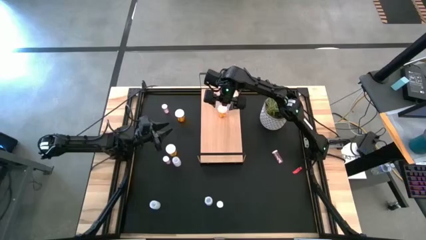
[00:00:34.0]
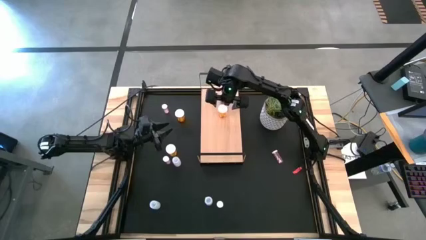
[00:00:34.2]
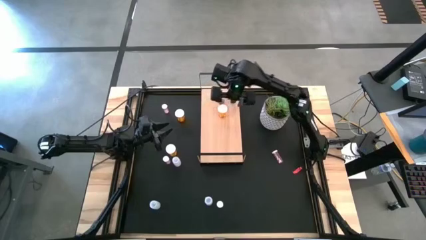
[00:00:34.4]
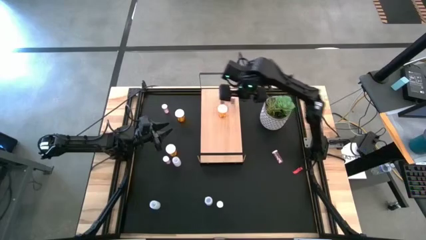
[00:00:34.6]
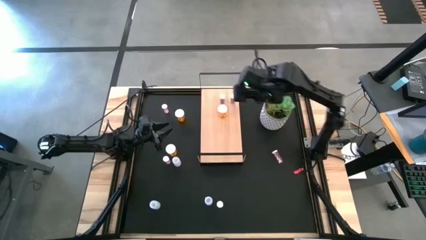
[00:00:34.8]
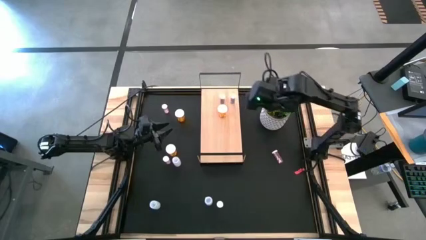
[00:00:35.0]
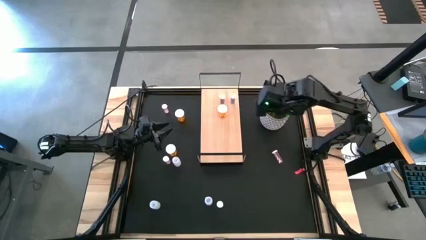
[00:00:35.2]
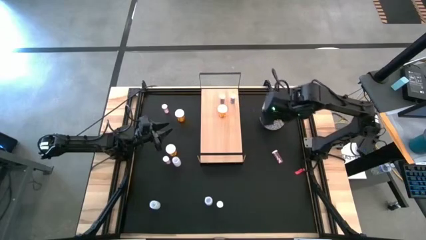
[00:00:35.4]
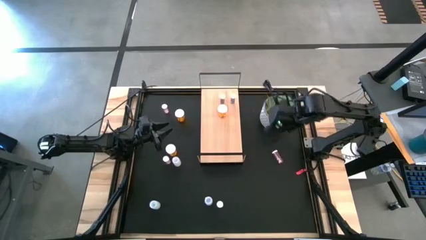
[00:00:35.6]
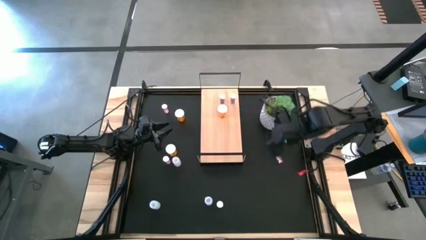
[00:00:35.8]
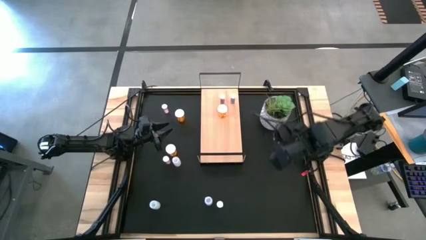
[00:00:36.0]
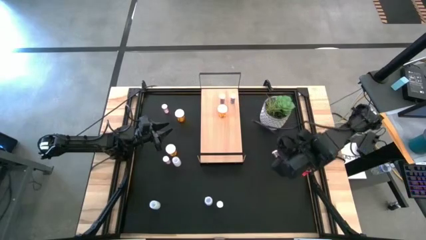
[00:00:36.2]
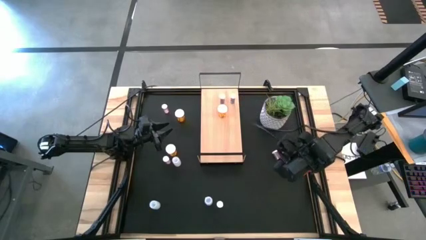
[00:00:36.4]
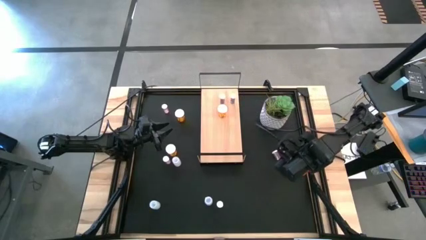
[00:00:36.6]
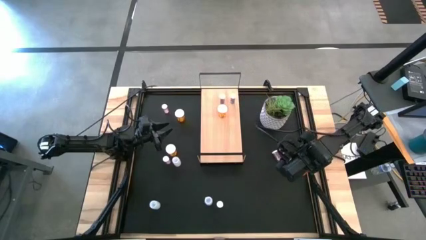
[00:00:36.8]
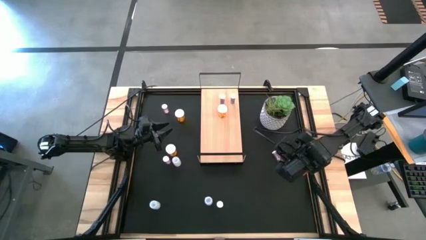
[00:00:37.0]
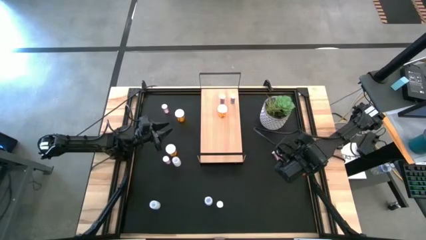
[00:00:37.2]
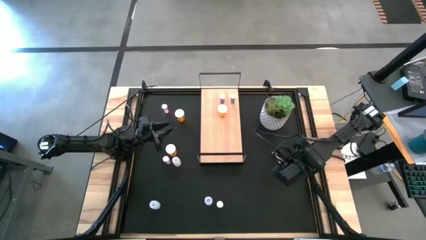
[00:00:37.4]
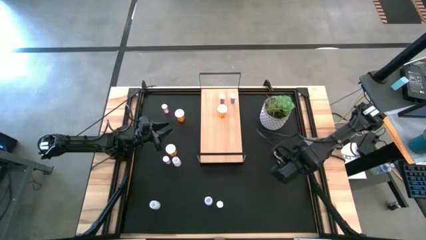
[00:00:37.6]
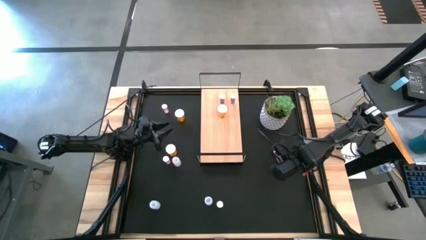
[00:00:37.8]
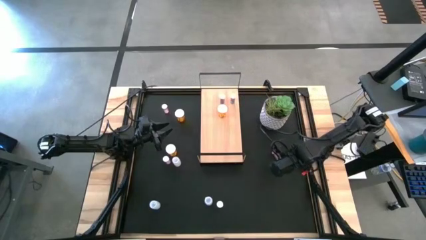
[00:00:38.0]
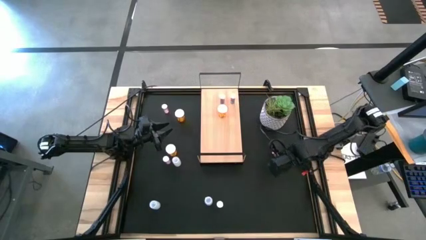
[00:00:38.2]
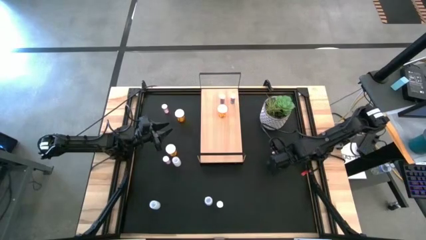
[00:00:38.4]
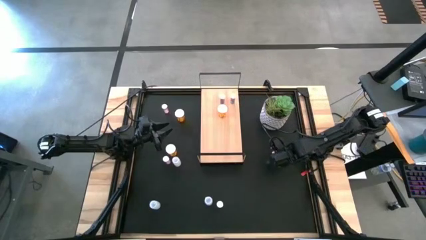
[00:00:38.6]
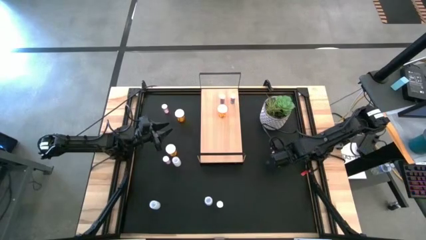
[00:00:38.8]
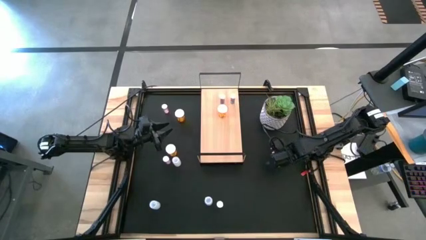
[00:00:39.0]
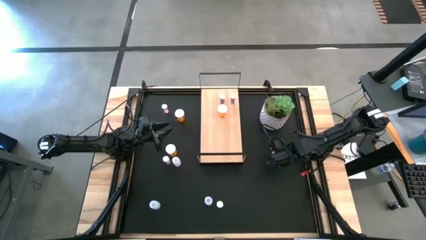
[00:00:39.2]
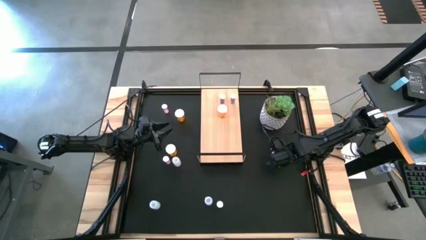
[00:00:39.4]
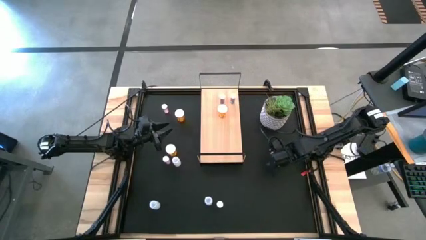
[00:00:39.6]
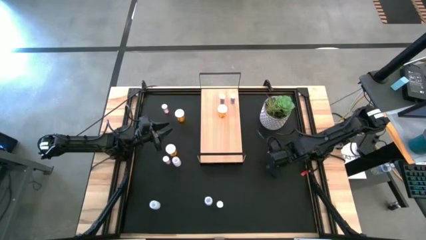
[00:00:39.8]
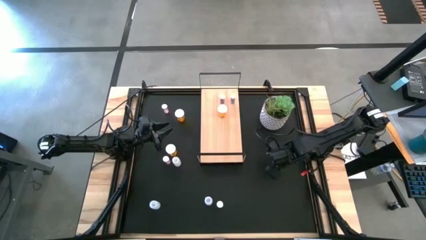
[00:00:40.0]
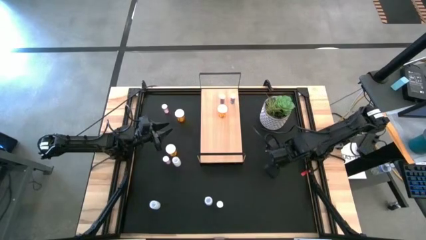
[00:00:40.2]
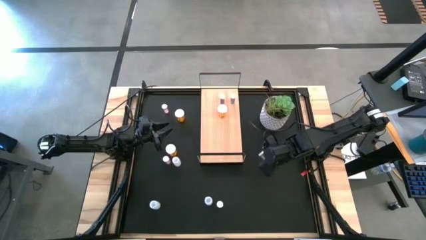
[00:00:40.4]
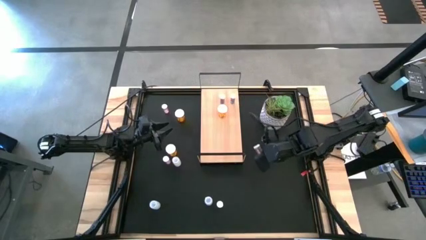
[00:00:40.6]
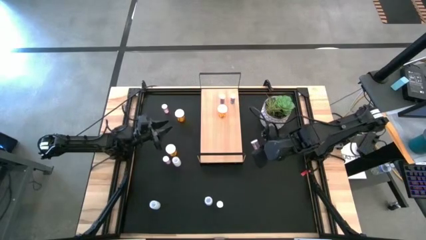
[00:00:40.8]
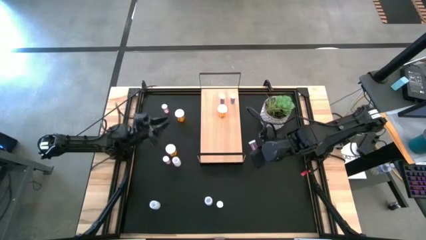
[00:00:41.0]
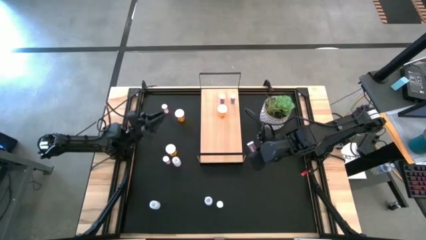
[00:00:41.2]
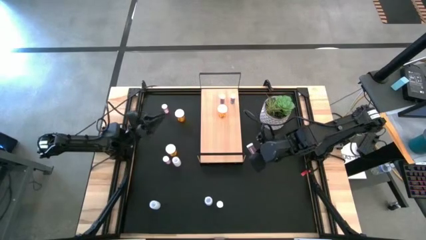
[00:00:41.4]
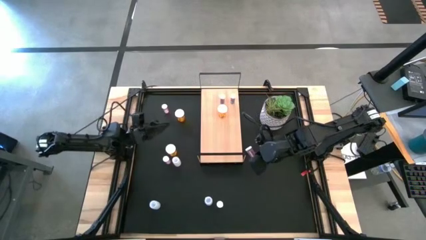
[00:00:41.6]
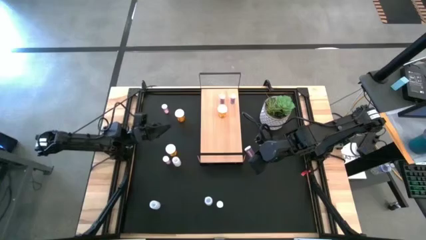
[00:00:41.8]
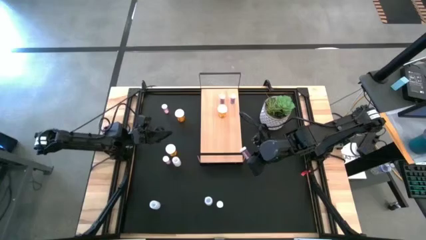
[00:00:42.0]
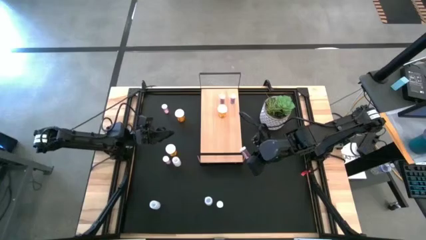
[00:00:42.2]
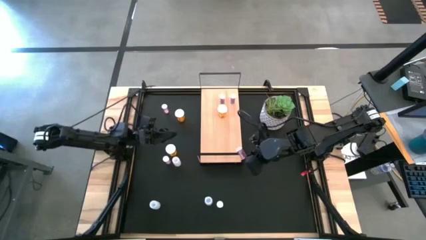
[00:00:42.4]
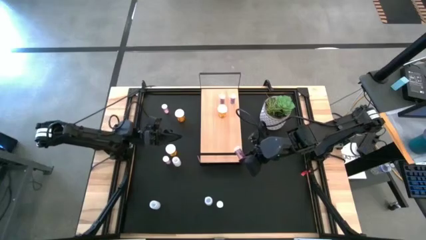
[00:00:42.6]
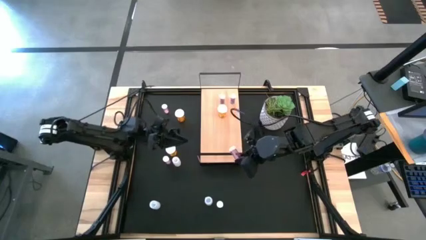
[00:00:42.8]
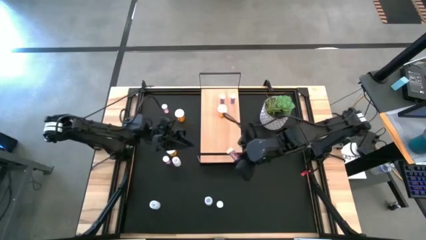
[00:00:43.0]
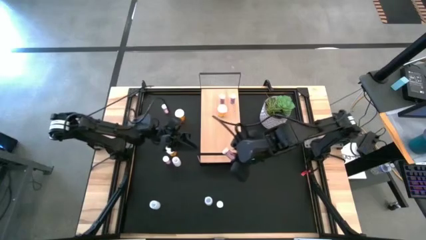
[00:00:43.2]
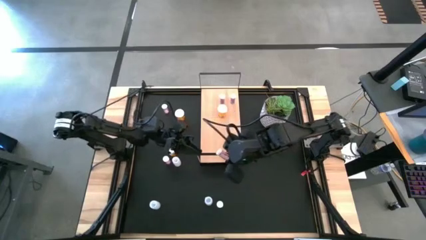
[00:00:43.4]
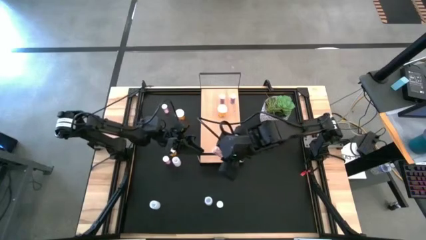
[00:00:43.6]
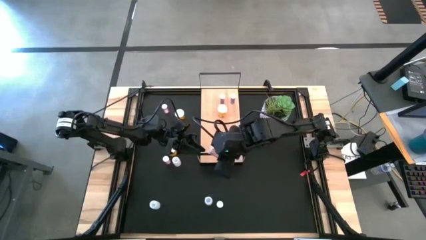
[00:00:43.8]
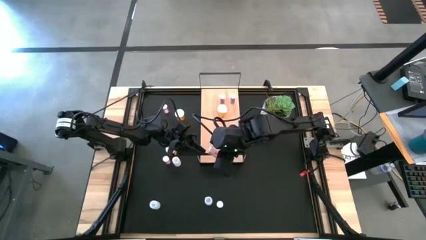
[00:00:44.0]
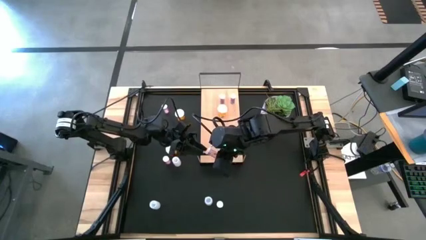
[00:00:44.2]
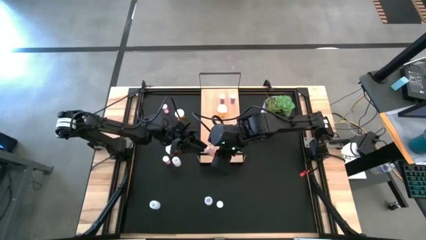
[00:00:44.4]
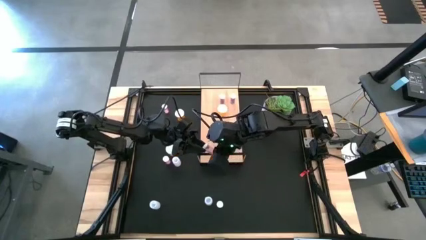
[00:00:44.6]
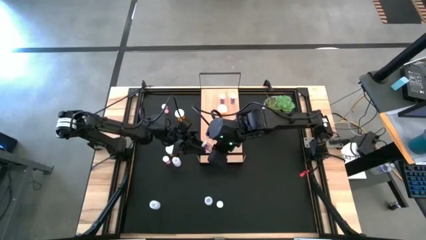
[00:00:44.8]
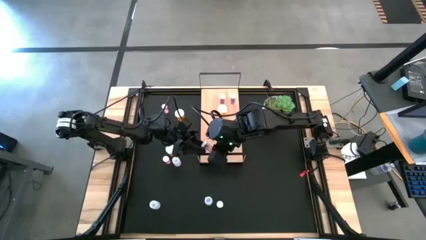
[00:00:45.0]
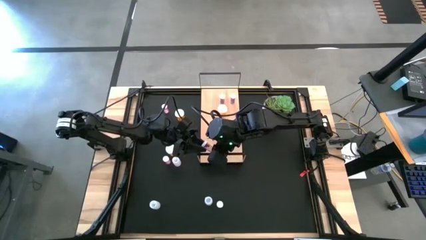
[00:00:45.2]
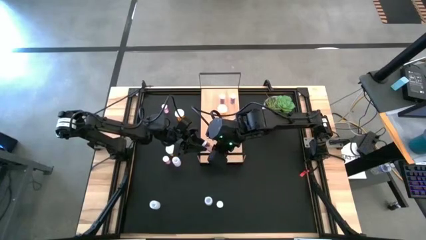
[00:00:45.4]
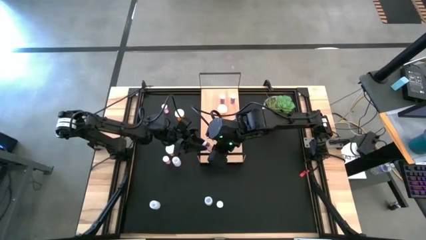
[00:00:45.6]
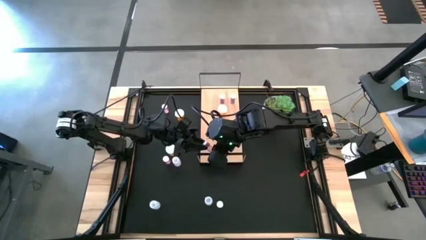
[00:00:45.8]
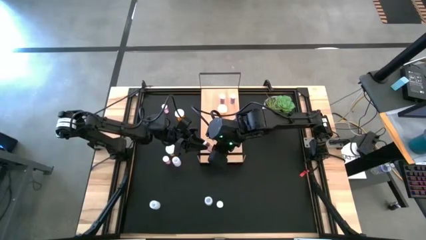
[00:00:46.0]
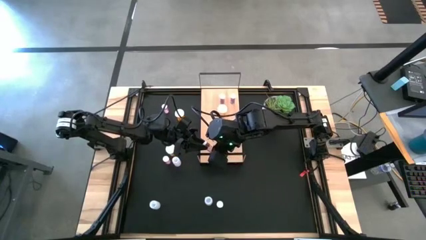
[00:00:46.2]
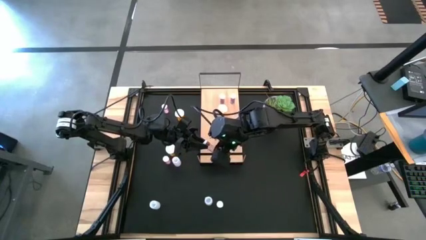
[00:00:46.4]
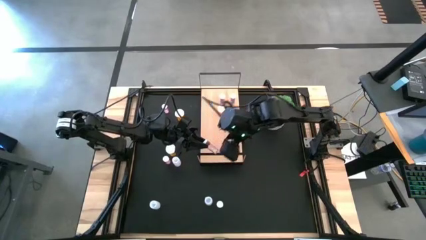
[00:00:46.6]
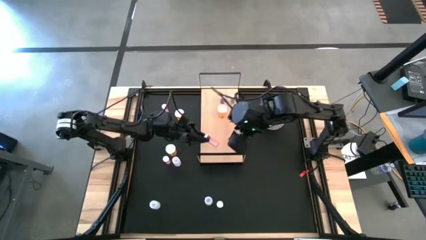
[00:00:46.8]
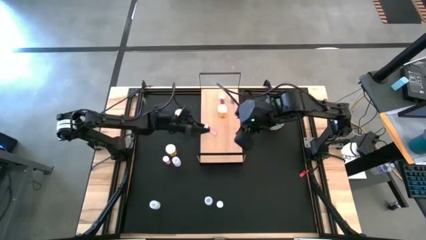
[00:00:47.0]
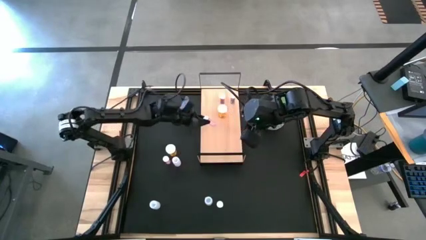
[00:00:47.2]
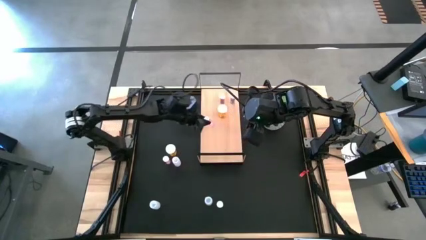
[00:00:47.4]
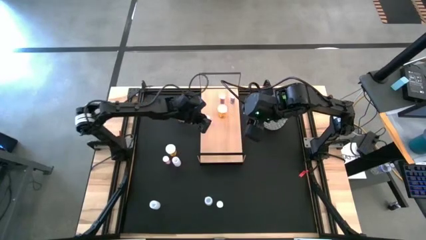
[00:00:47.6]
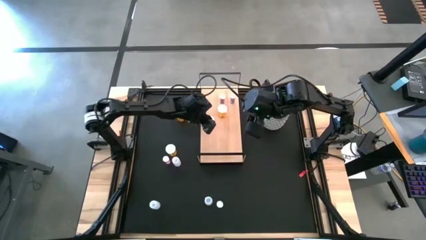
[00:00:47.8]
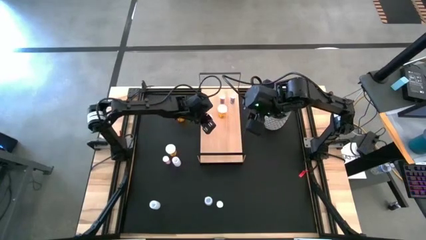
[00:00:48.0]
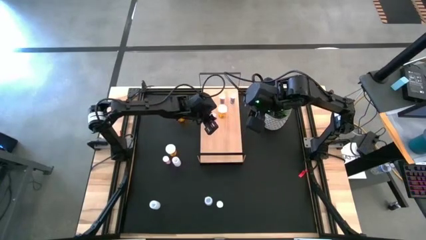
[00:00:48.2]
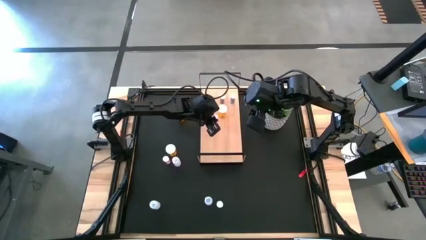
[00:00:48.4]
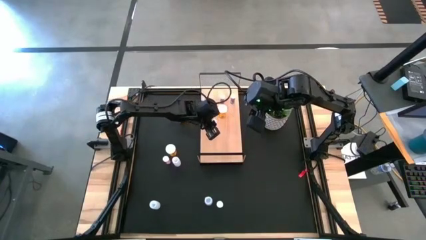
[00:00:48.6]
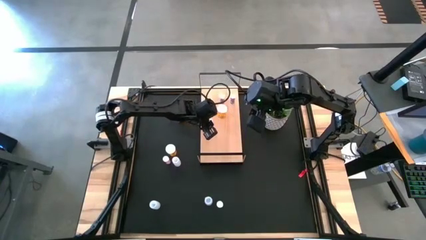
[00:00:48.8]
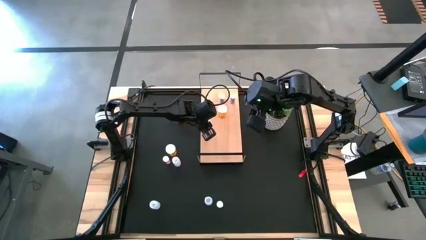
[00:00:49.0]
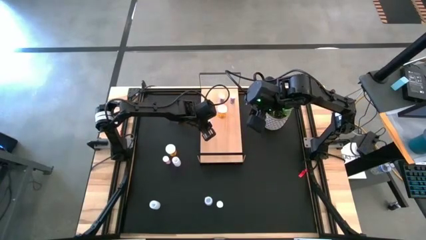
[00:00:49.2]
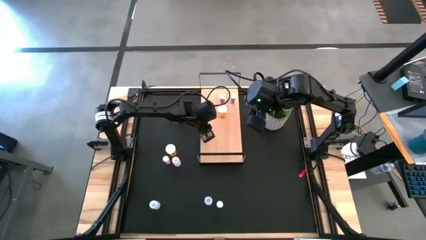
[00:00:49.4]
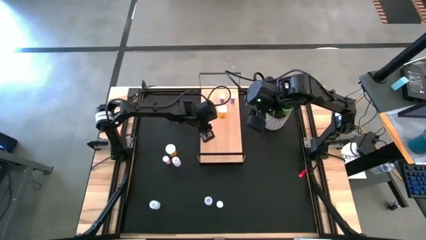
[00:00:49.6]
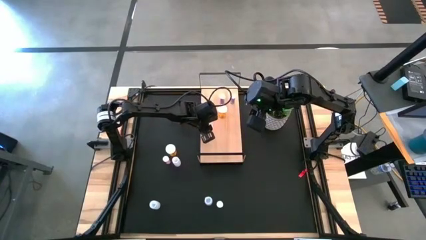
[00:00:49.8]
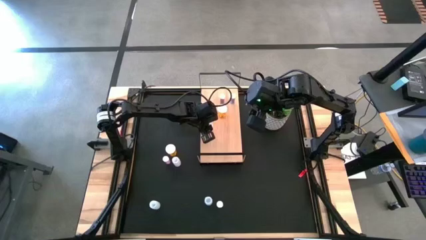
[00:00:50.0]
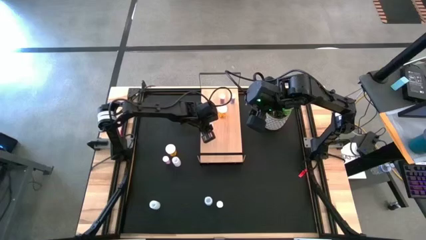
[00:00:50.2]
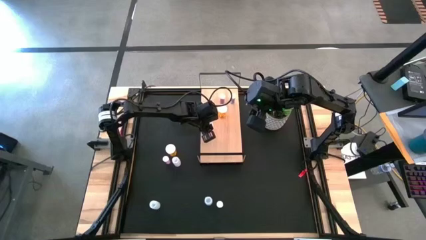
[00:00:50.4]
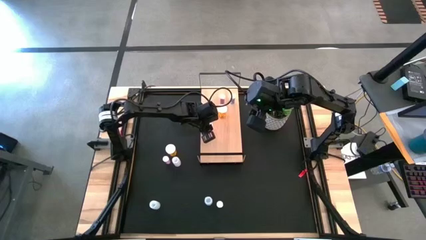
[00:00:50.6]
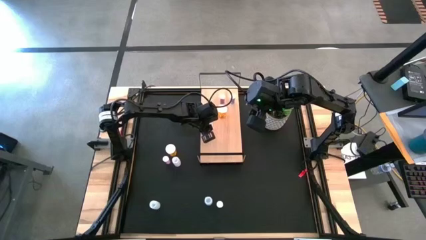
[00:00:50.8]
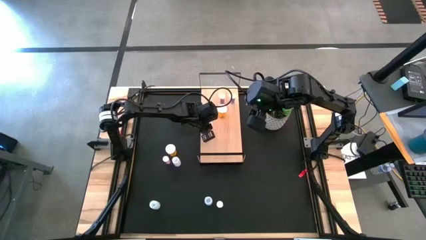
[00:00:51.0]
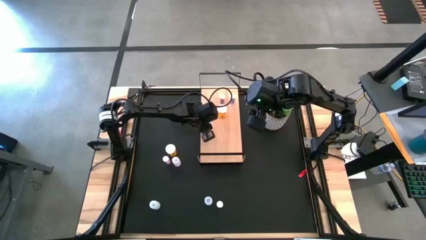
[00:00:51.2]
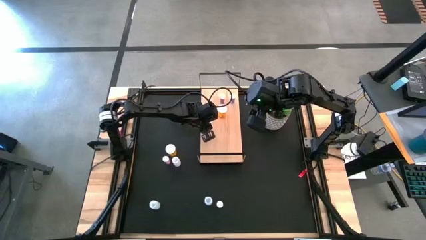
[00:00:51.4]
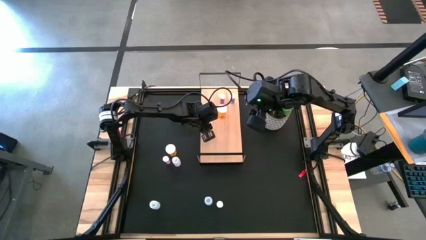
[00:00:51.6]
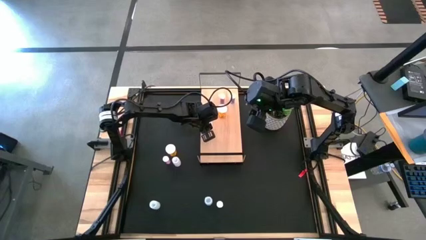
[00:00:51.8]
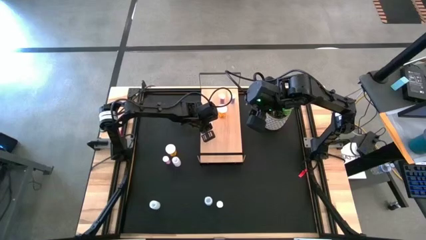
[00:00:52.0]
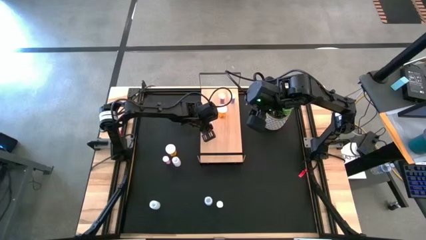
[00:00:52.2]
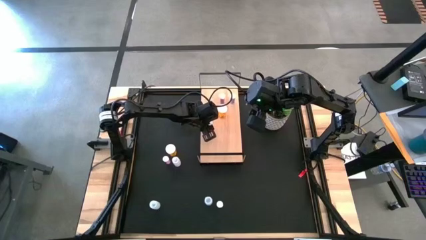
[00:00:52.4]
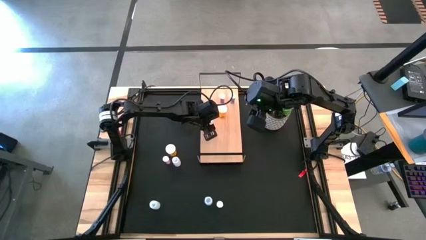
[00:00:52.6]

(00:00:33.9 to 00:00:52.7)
Task: Pick and place medicine bottles onto shelf by color
Put the bottom right pink pill bottle on the shelf
